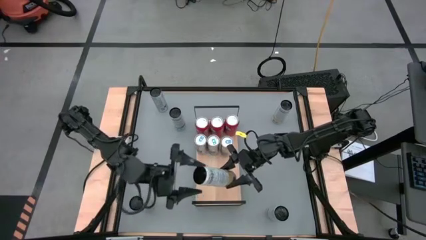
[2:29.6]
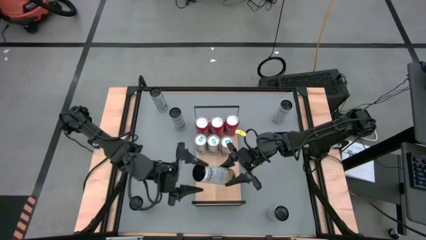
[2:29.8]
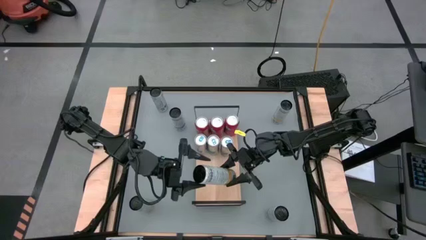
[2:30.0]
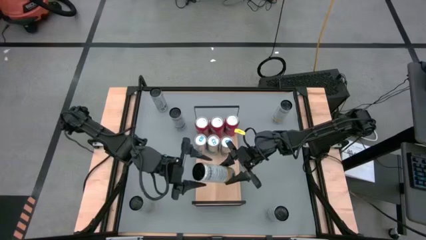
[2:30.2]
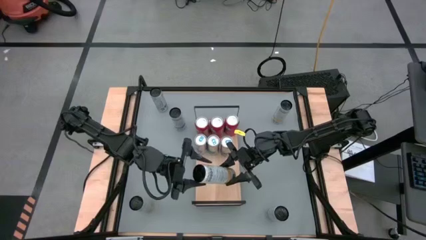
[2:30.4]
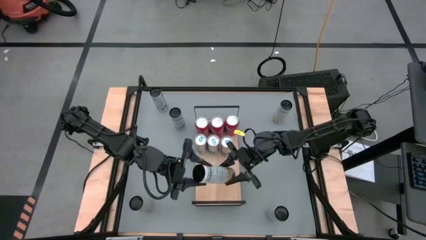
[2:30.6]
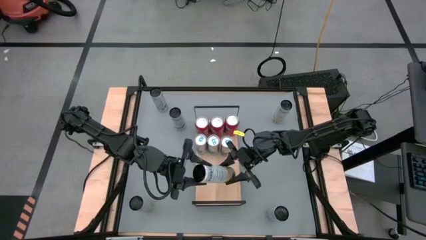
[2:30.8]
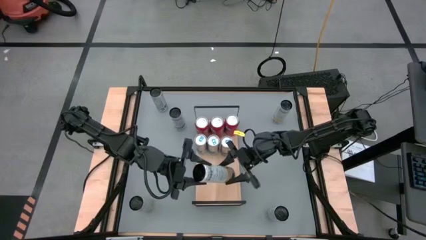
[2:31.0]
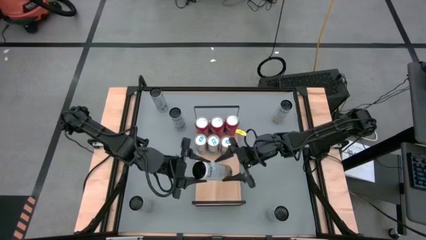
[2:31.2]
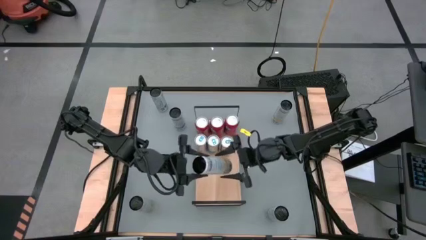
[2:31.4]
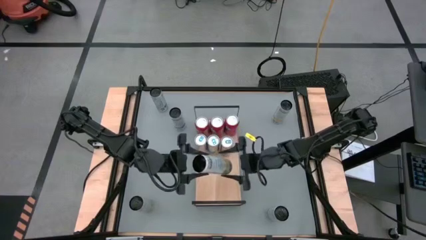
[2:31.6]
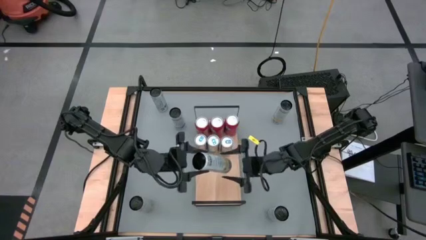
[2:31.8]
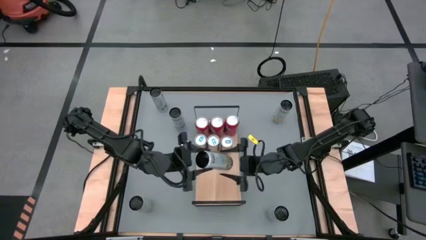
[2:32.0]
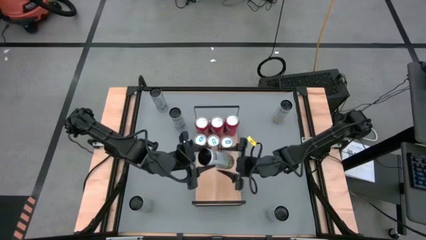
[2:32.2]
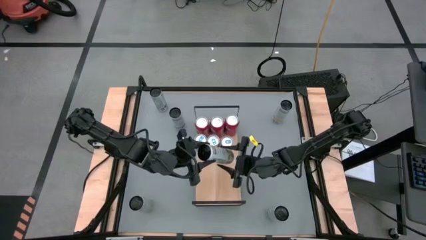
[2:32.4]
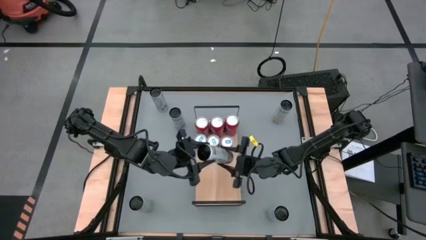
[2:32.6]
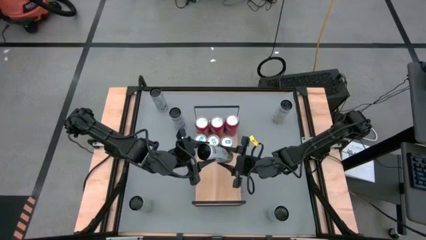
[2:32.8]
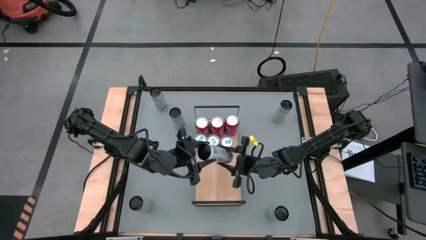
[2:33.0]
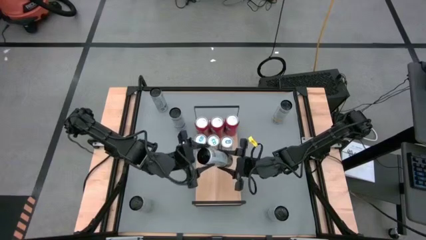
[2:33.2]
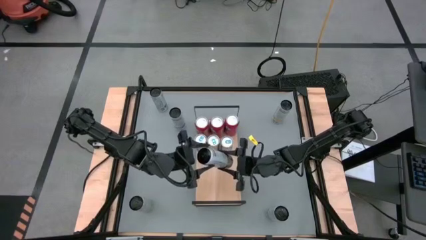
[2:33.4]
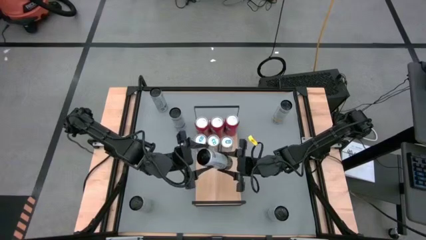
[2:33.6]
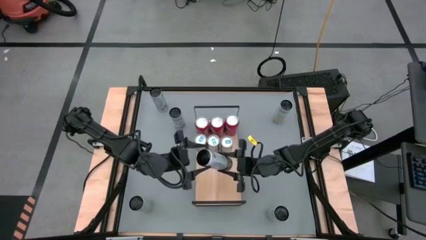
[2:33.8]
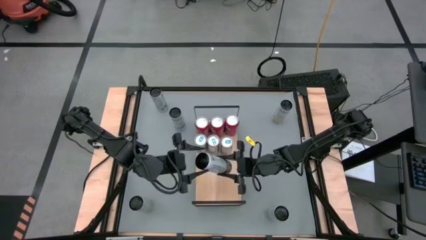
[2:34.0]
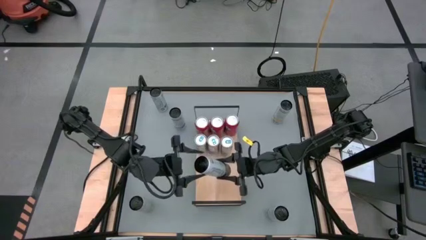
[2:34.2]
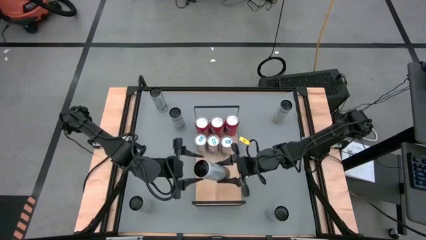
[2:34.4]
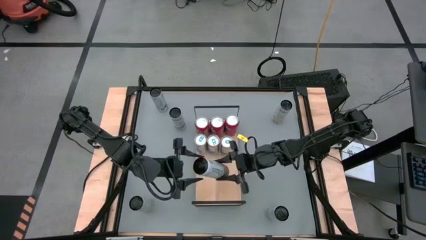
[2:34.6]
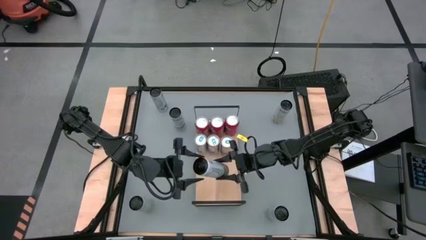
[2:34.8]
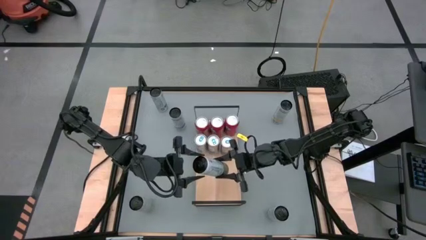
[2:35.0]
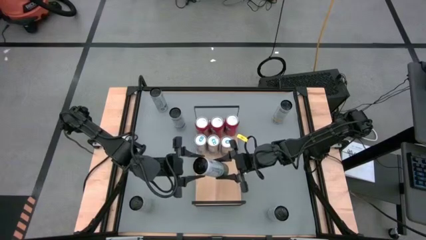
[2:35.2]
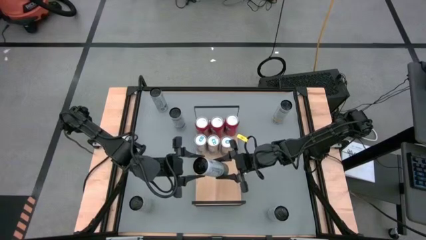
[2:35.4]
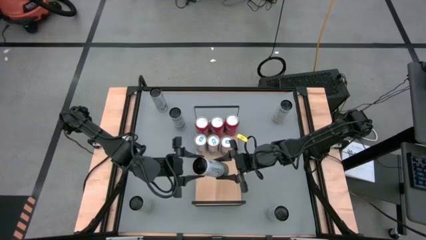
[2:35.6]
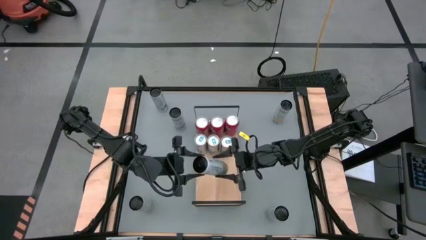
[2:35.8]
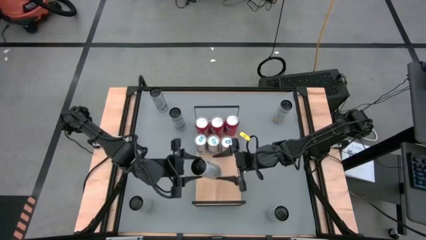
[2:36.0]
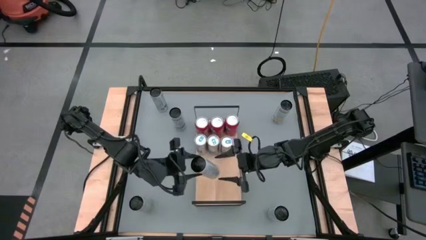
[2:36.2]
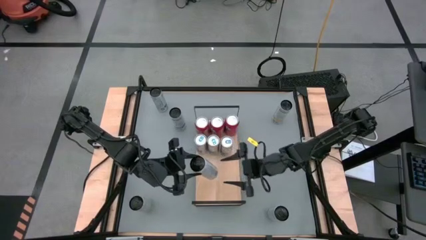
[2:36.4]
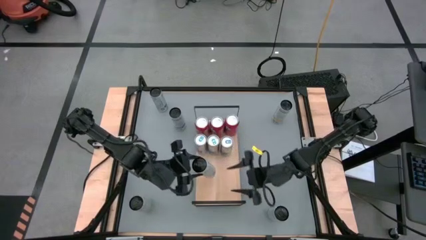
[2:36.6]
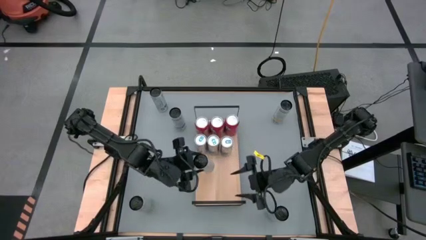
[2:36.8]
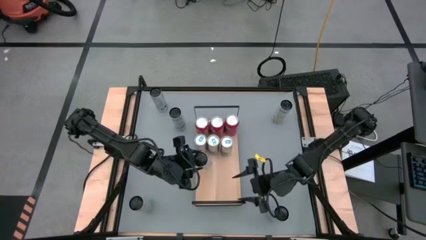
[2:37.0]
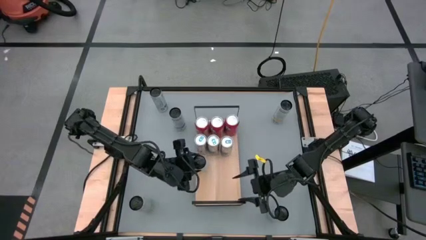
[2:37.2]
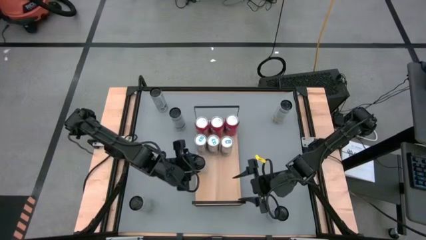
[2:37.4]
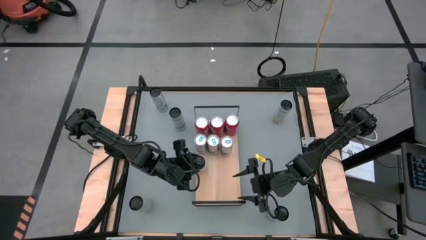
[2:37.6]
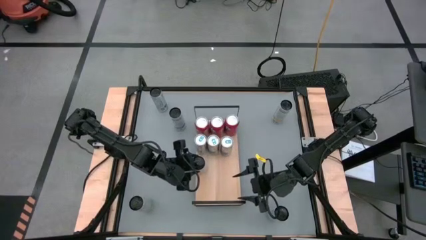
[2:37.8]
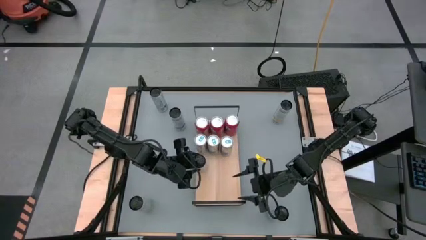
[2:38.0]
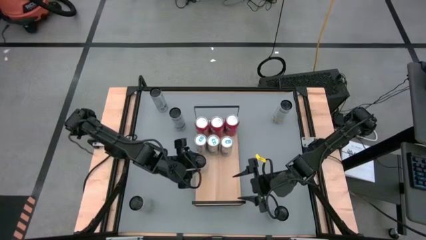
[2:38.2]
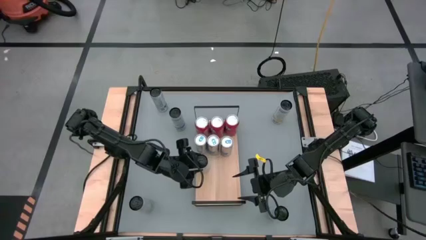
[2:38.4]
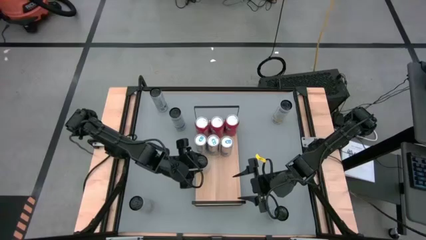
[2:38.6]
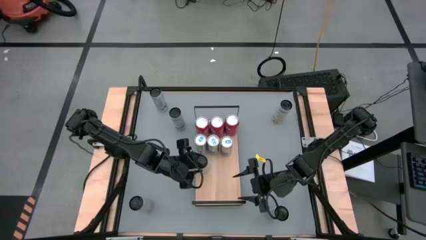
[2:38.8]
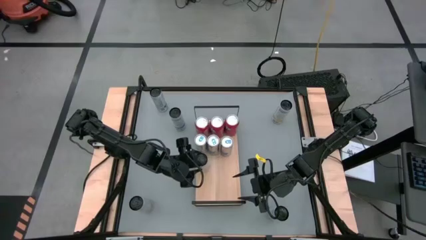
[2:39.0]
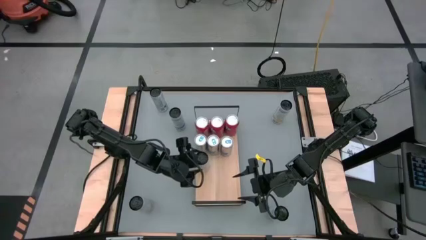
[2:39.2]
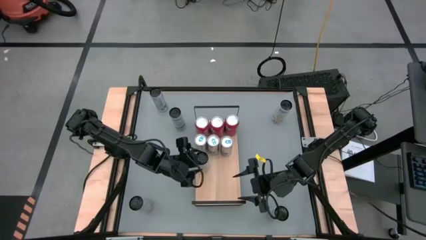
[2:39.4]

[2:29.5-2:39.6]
Task: Place canned beverage on shelf
Put the middle white-yellow soda can on the shelf
